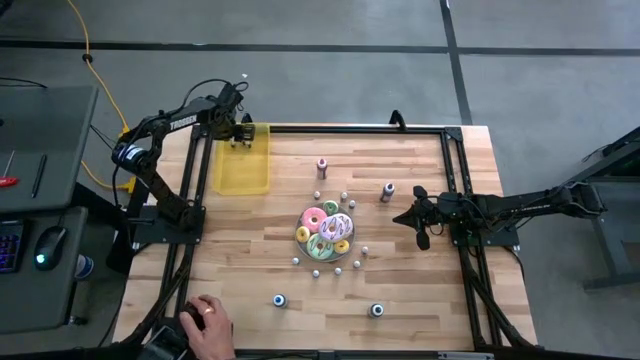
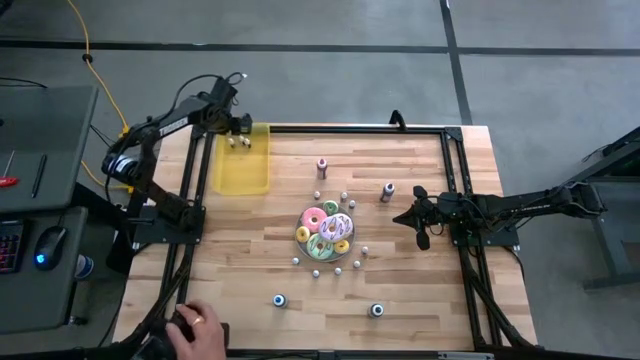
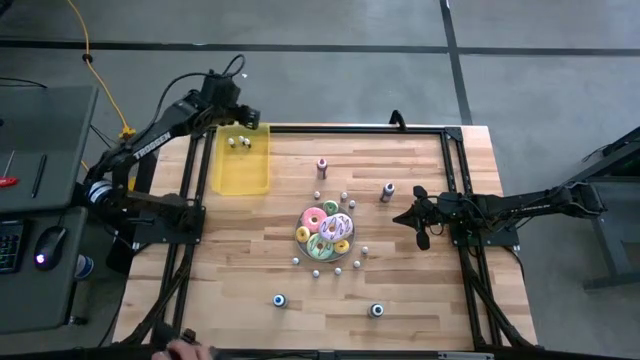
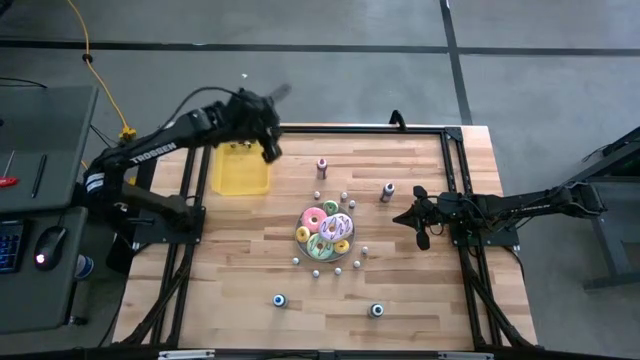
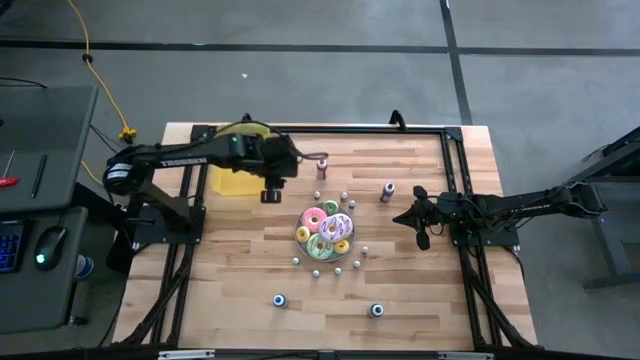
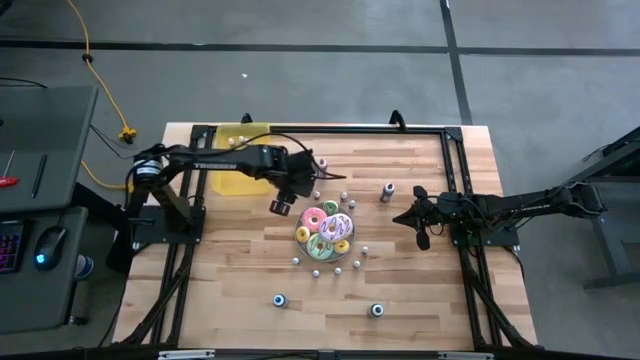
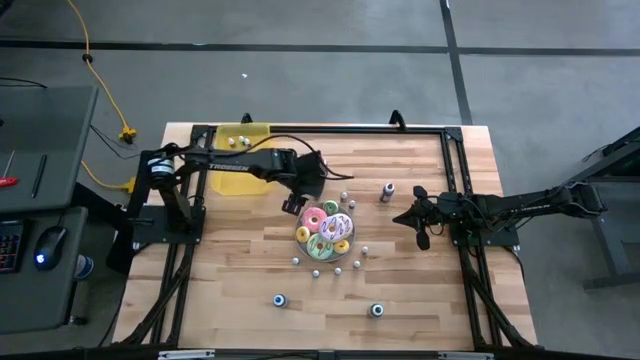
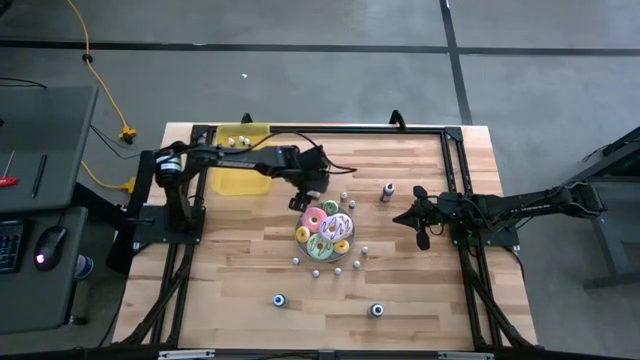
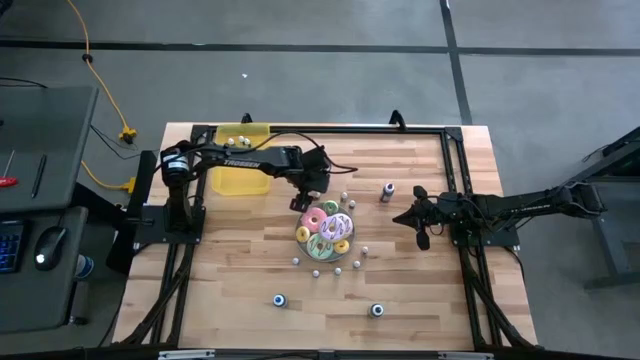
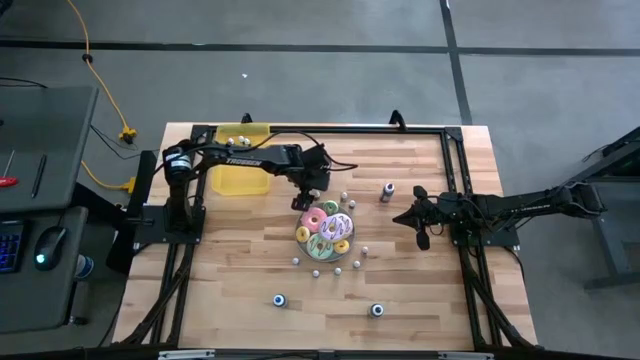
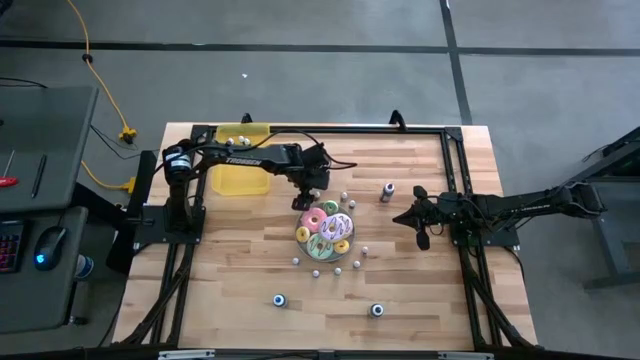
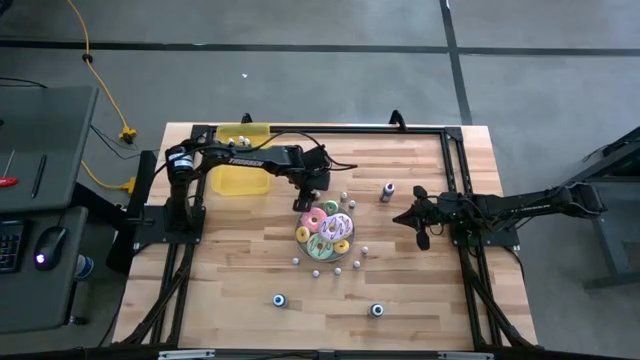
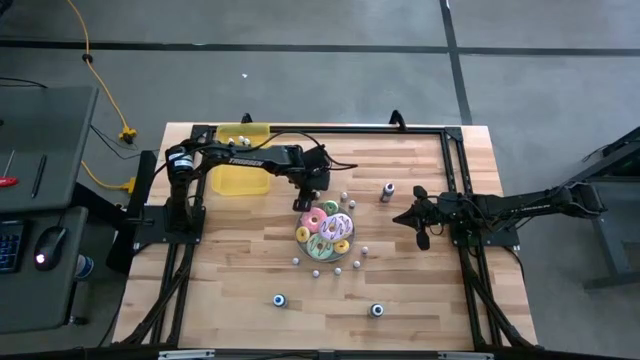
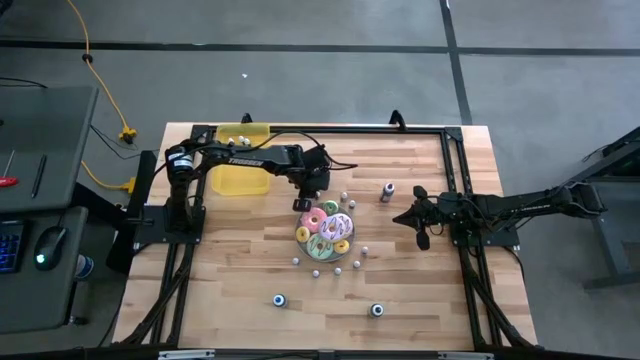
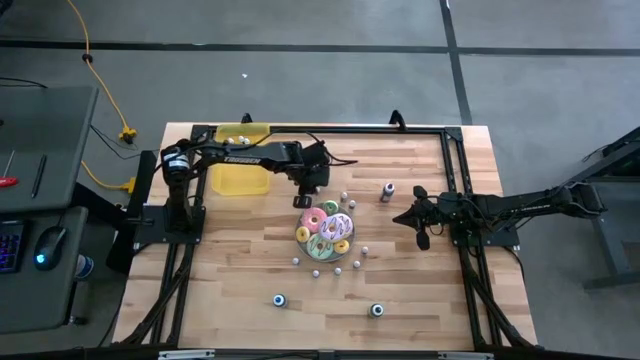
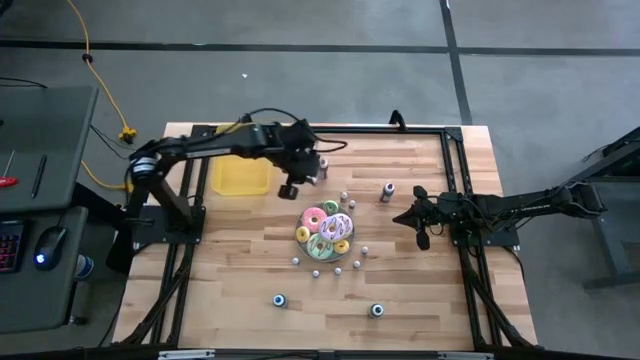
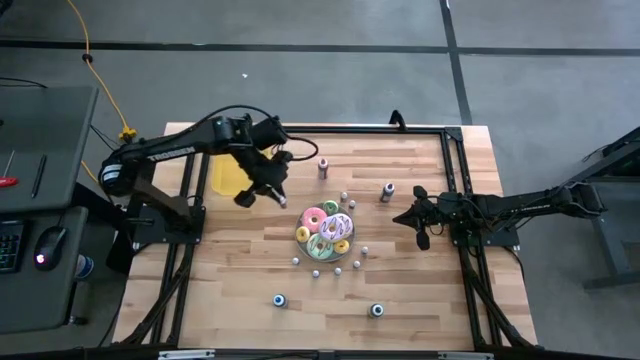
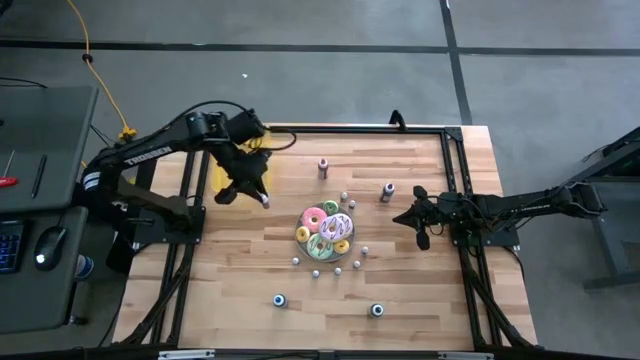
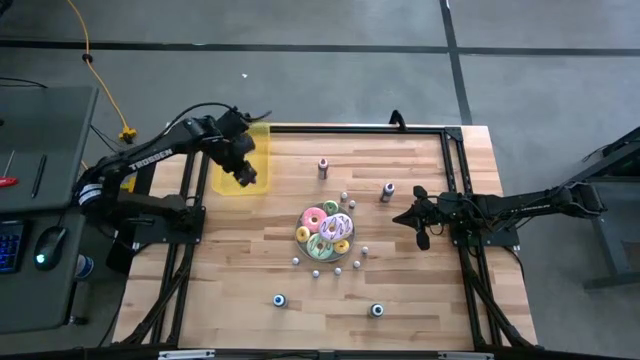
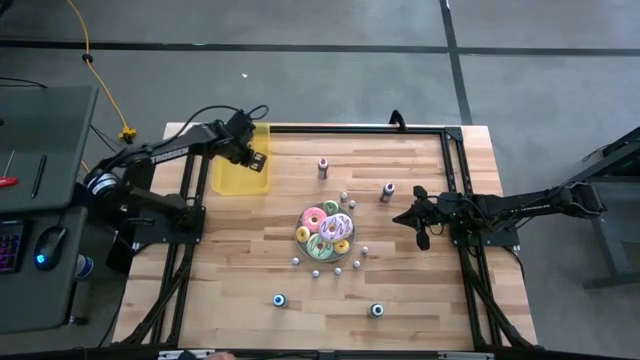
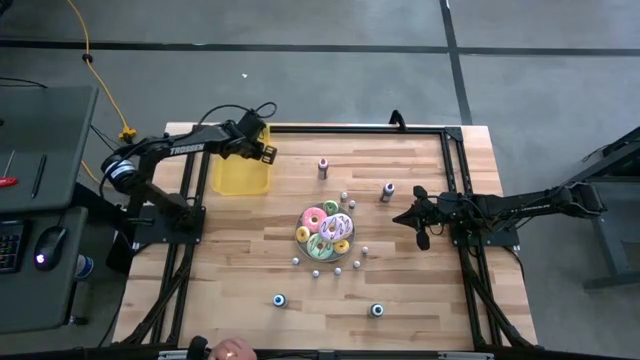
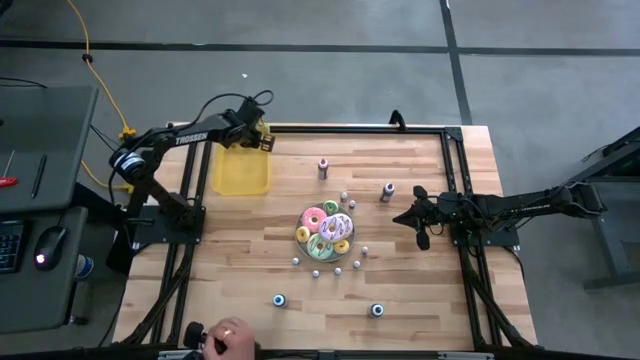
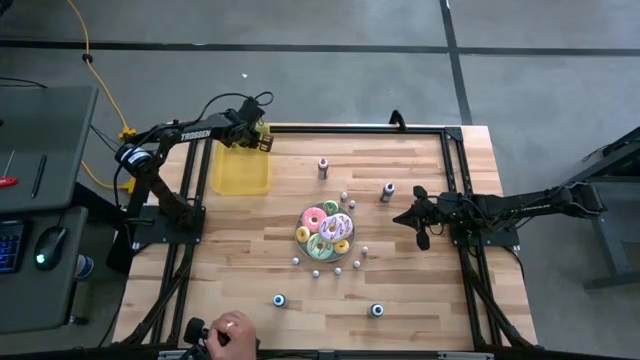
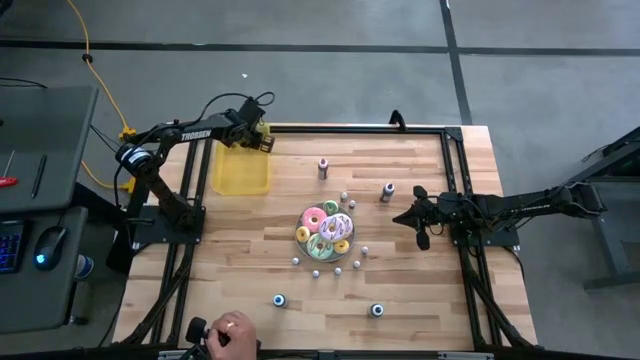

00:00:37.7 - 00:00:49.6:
Task: Pick & Place food coloring
Put the small orange food coloring bottle into the yellow bin

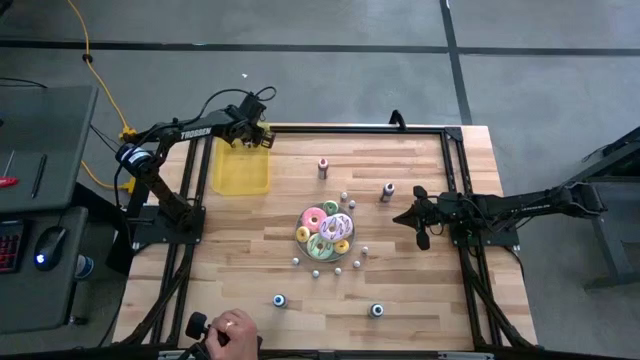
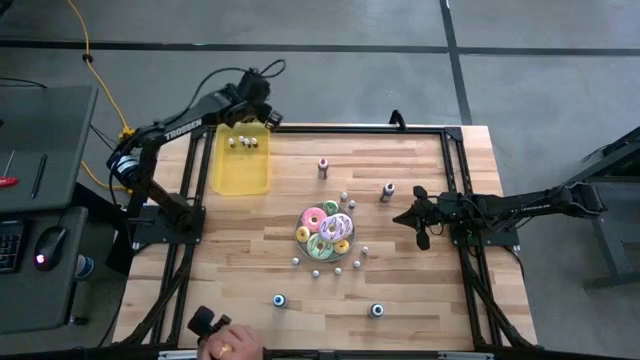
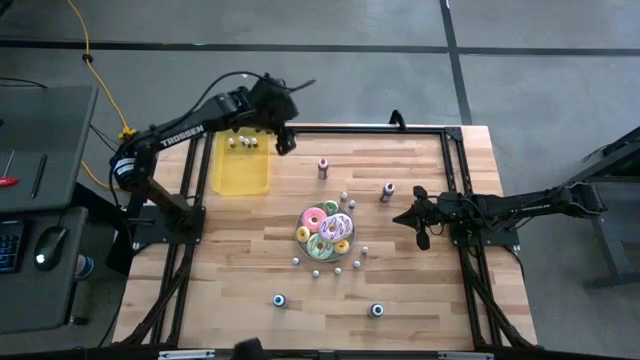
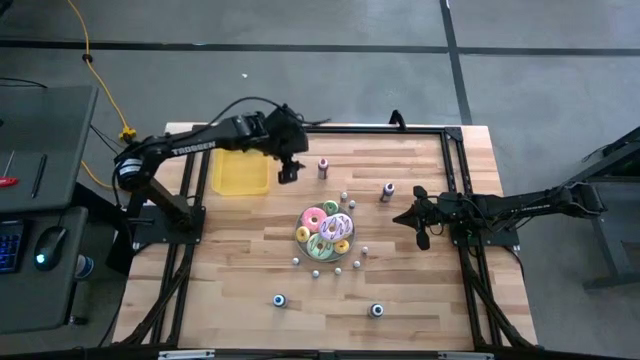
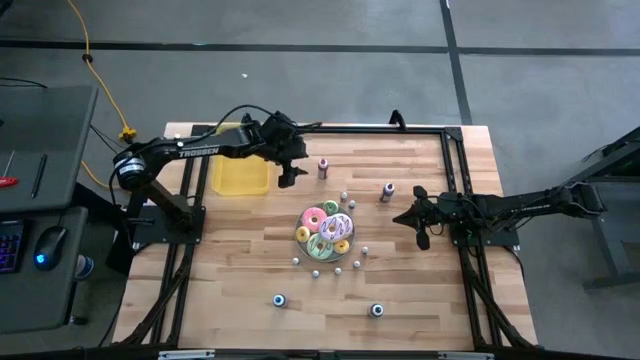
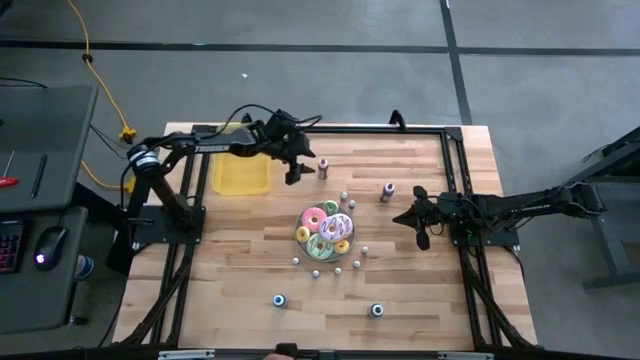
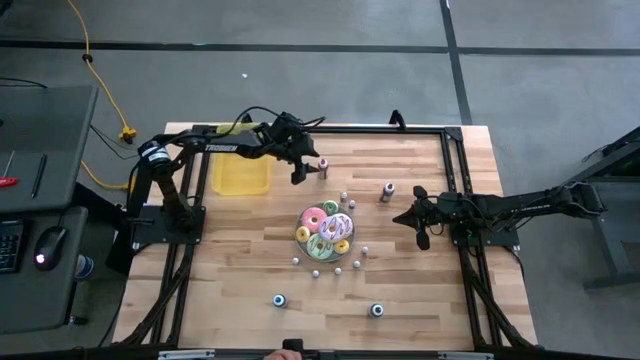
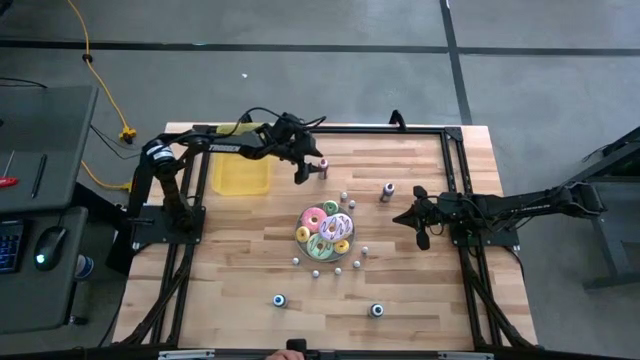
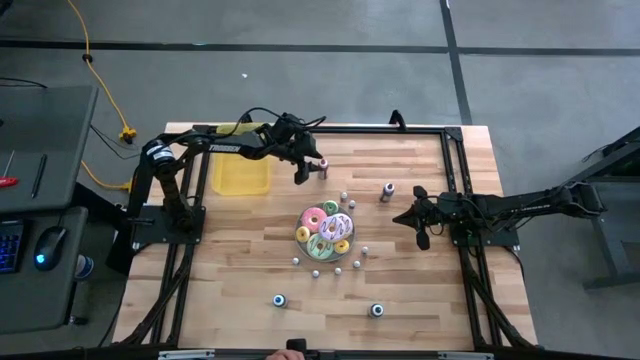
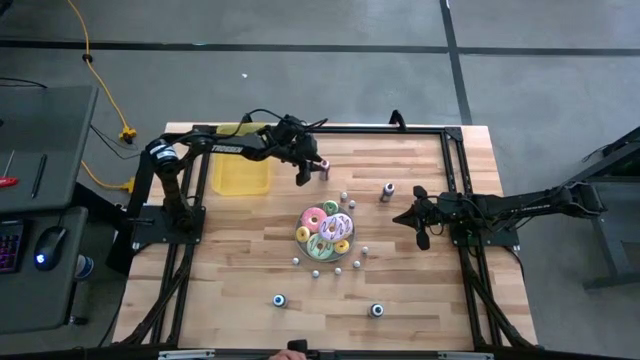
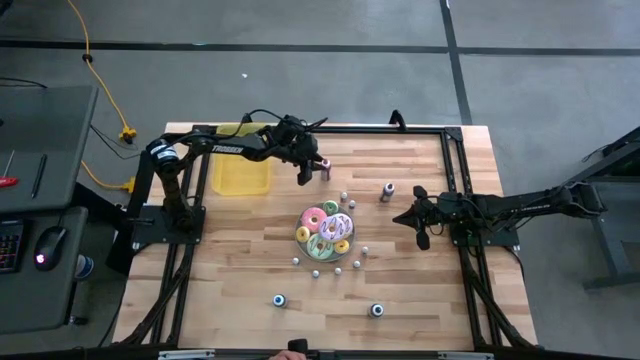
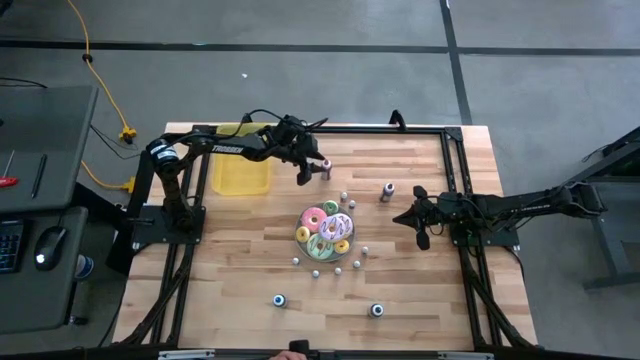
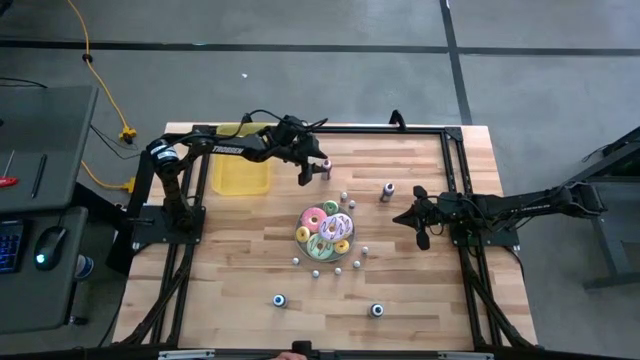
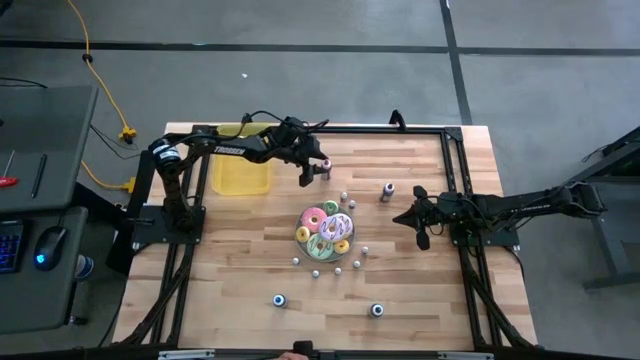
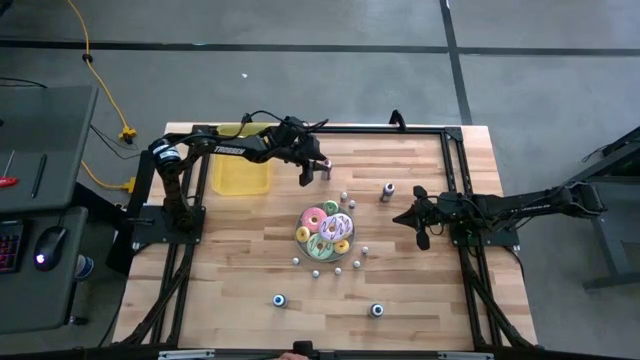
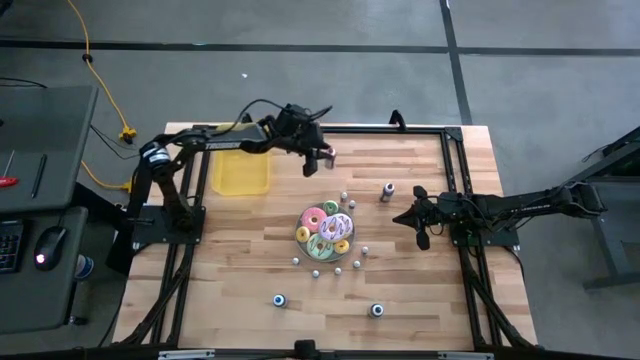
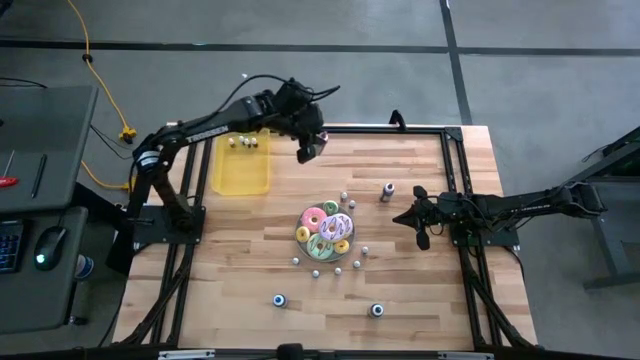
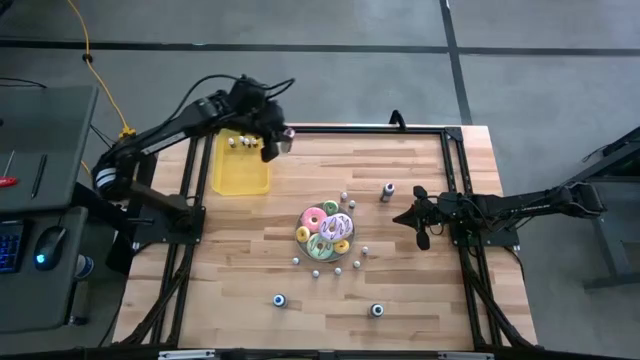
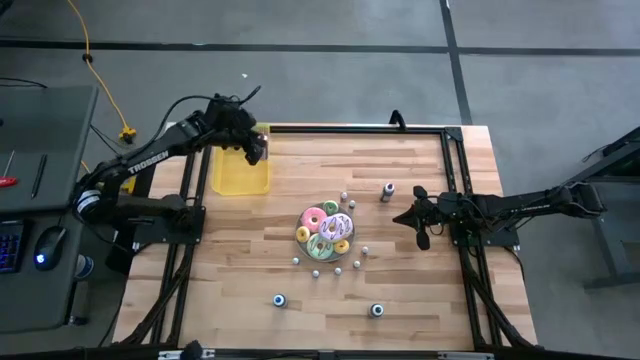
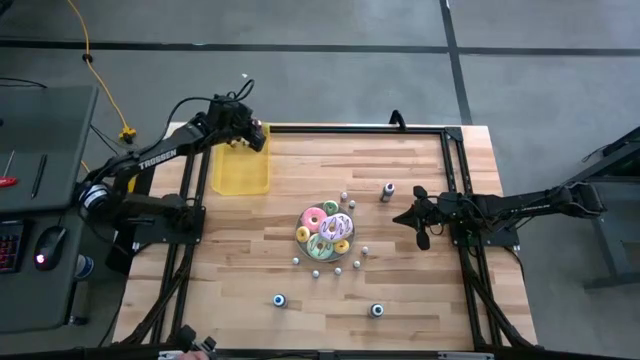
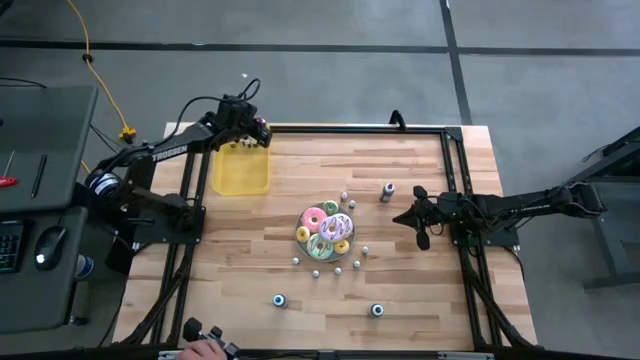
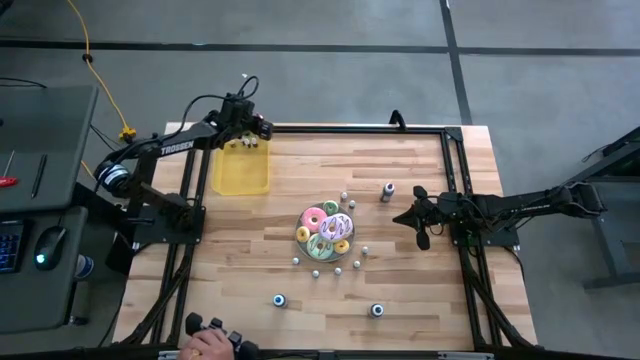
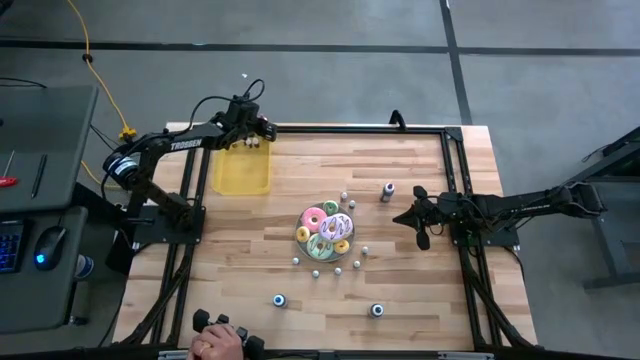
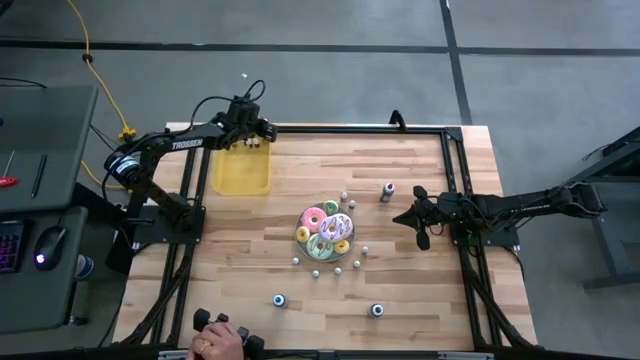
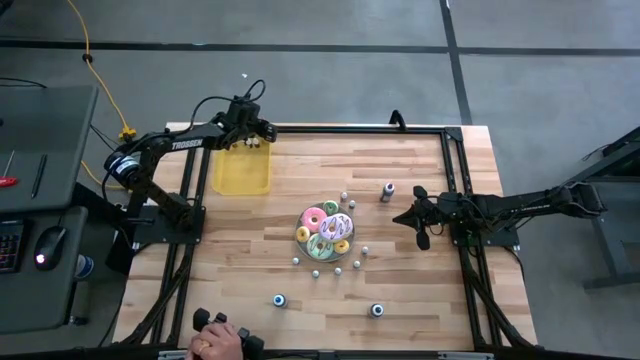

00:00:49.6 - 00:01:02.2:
Put the large red food coloring bottle into the yellow bin
